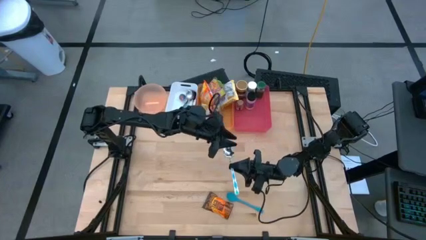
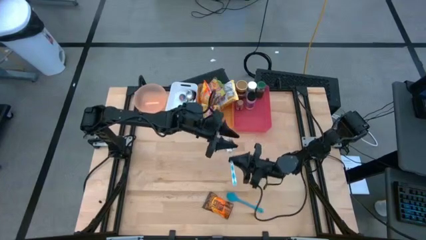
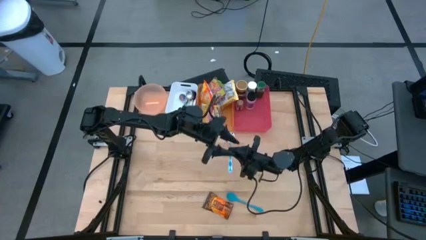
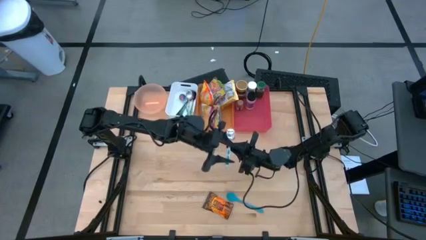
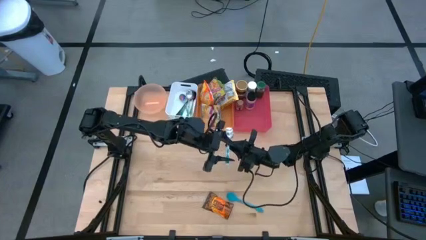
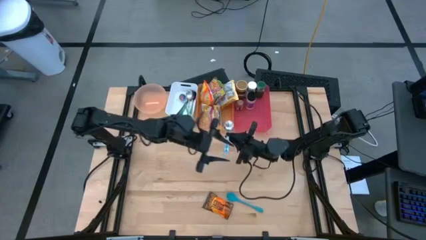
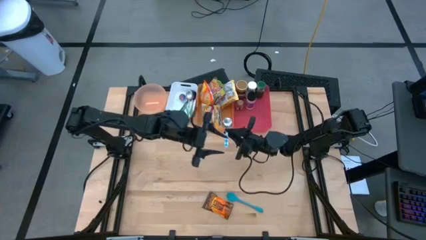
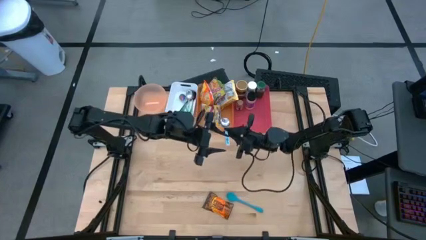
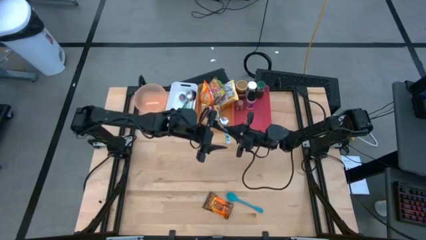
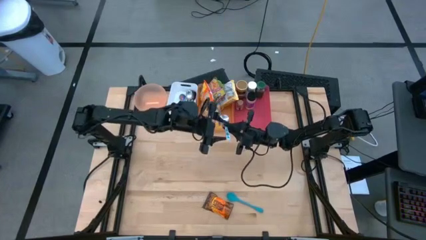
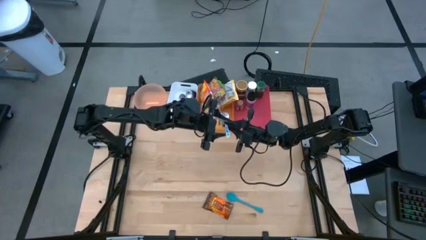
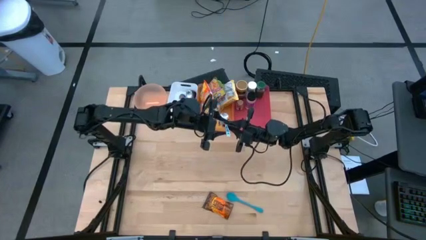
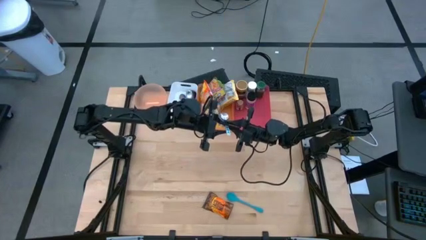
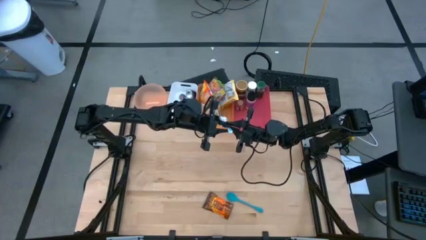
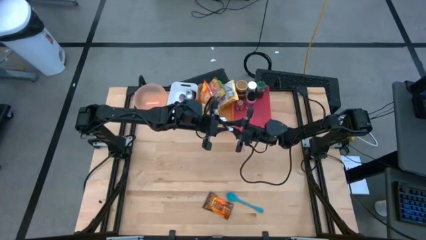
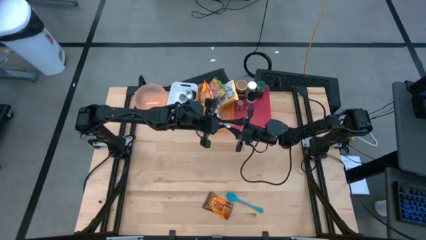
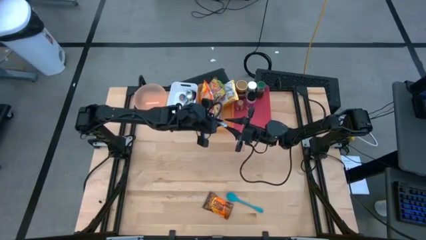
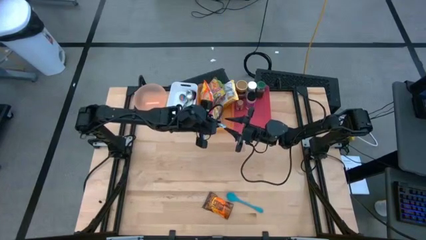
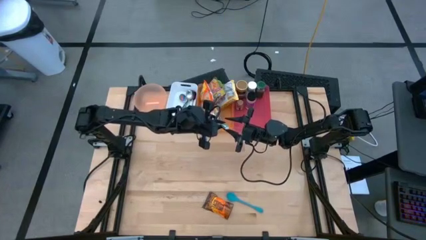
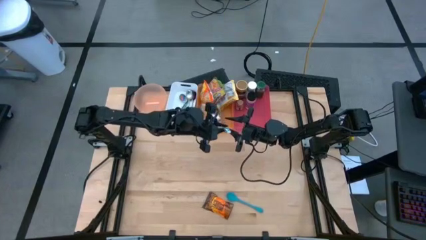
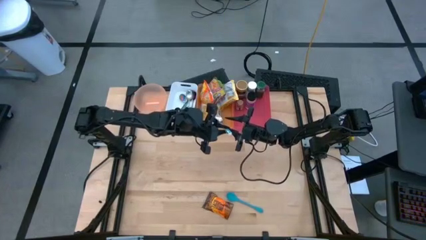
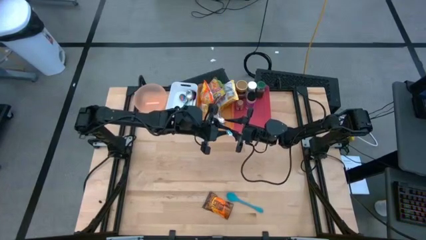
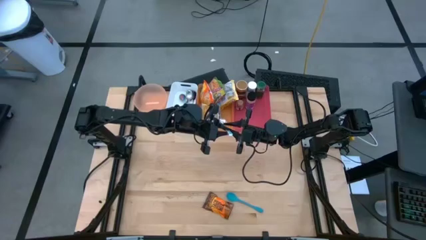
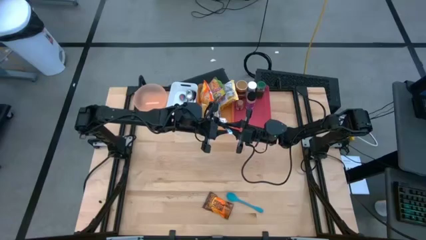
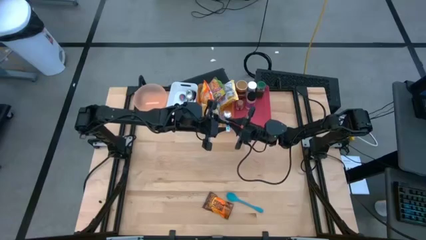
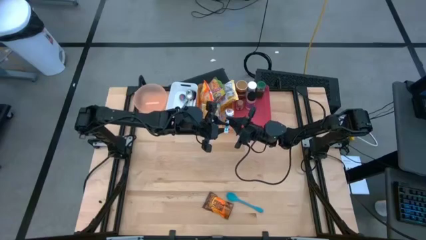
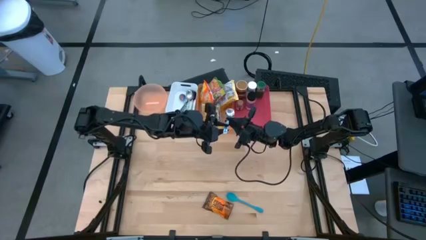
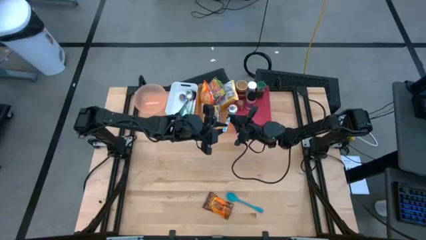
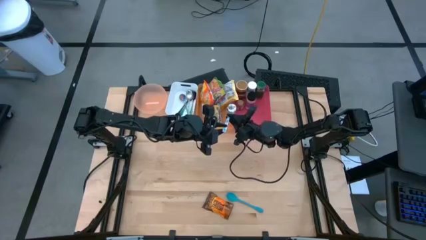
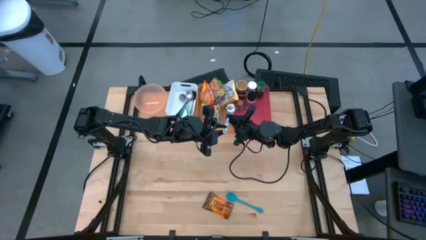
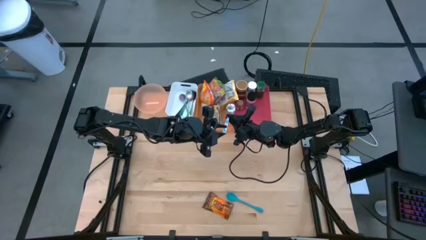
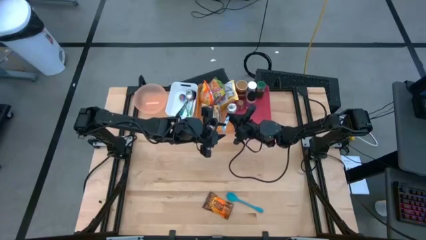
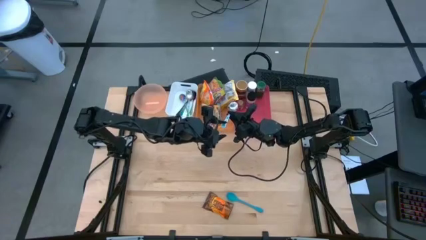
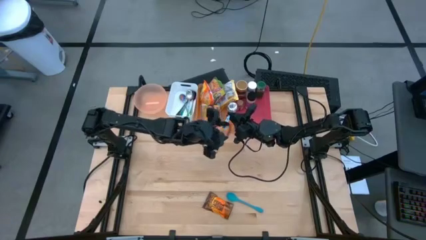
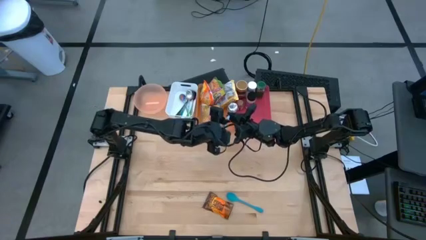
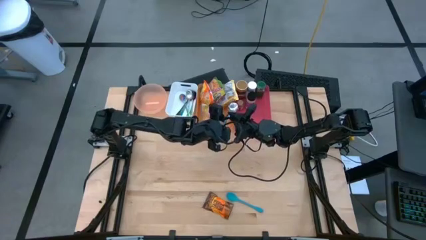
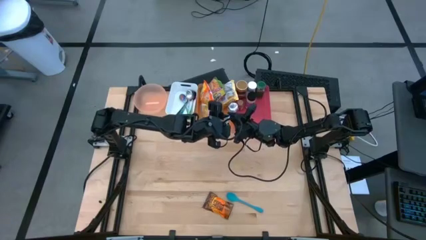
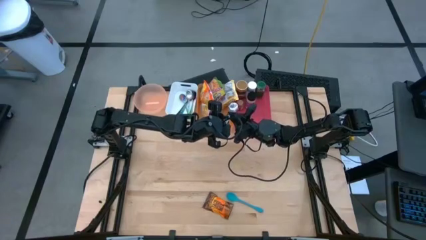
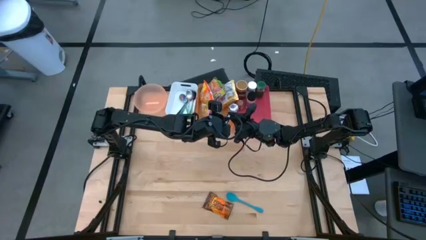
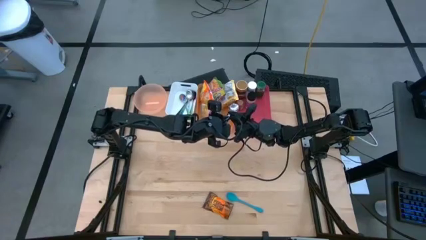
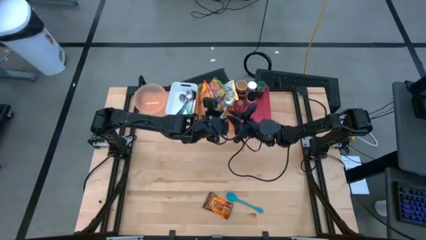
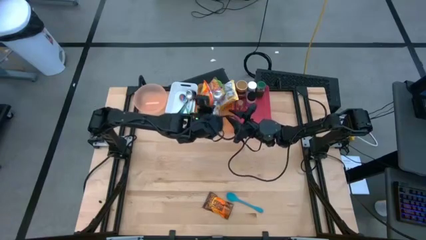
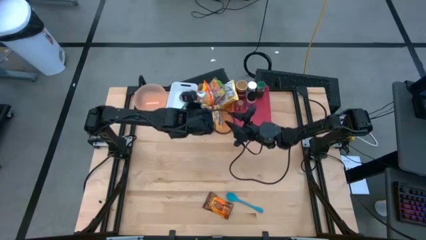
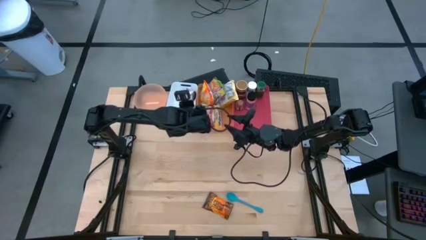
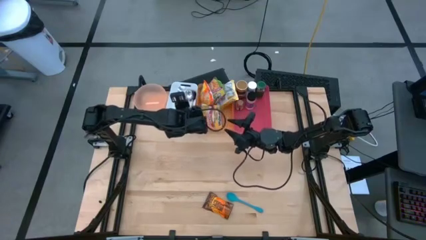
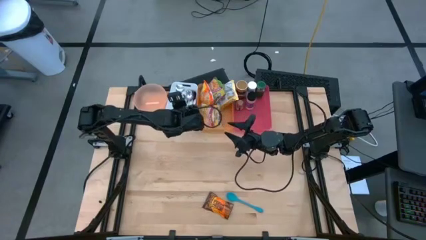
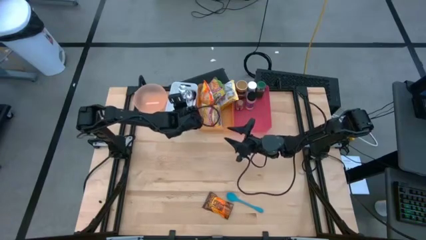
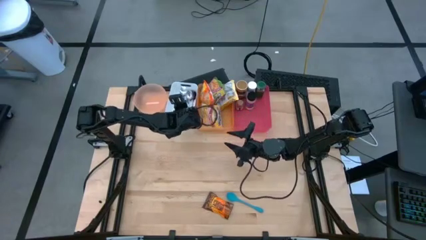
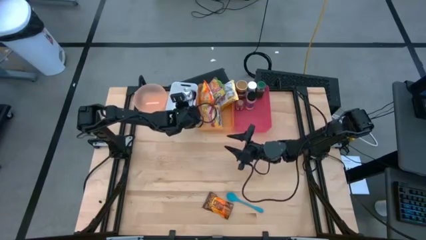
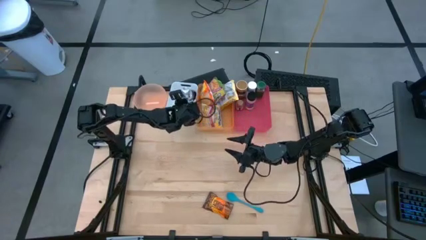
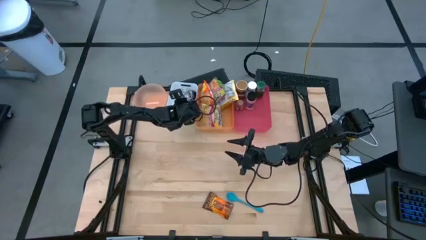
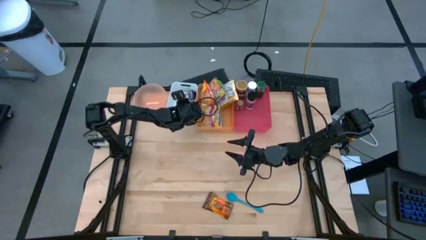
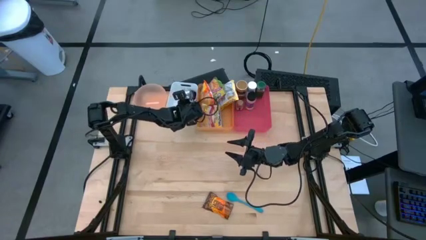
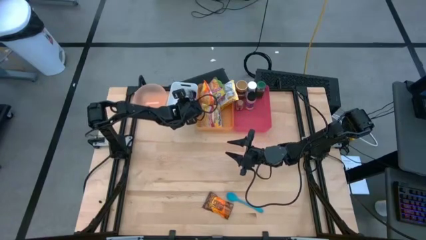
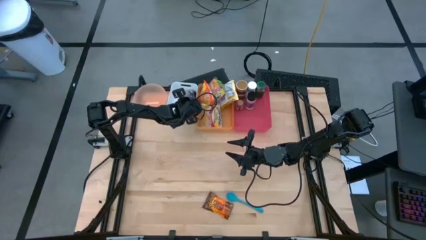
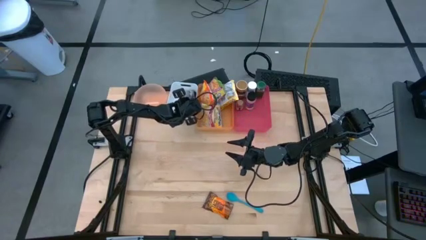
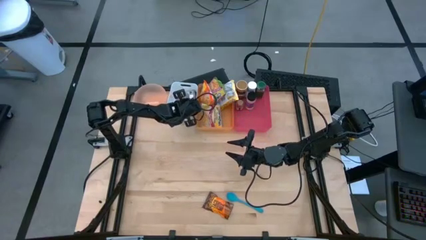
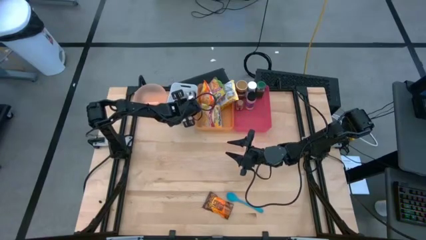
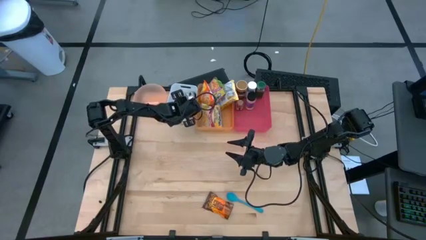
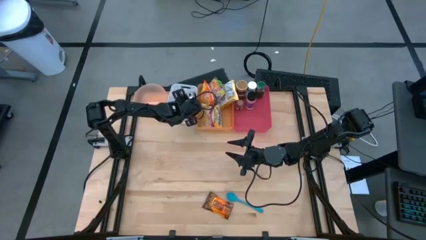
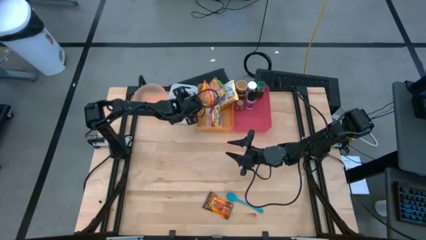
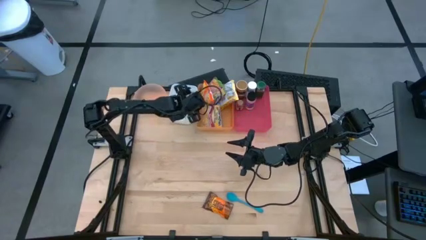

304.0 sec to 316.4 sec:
Task: Pick & Place Food Item
Put the blue patterned spoon into the white bin

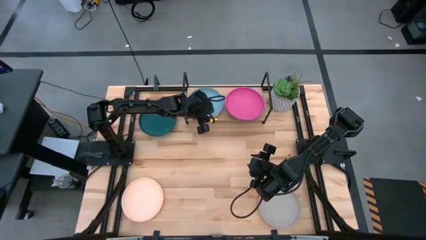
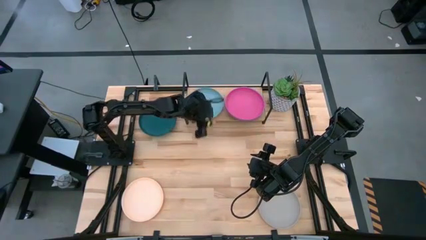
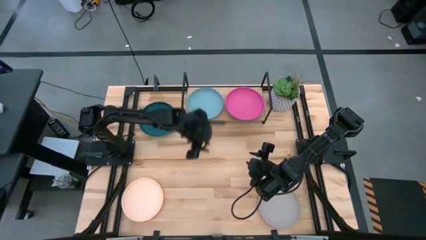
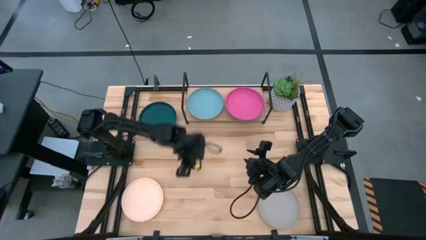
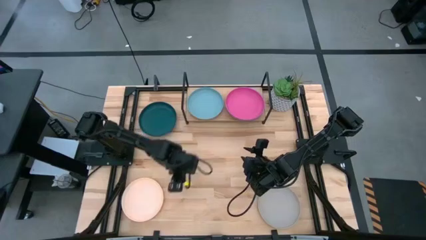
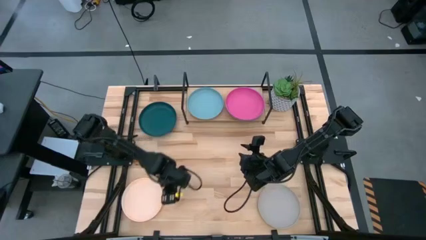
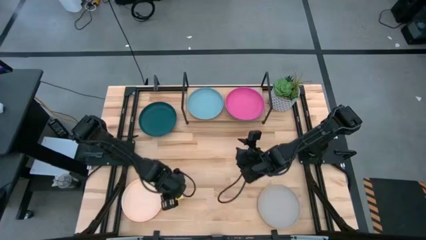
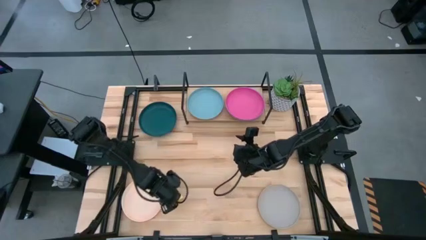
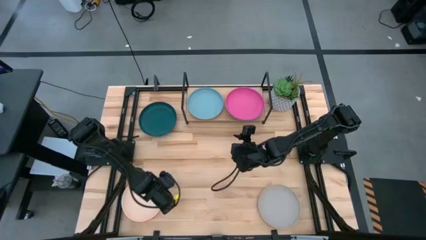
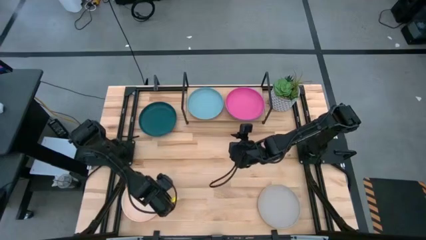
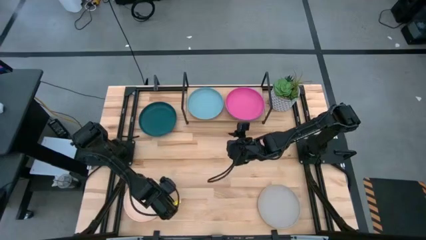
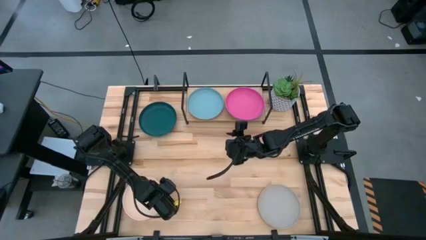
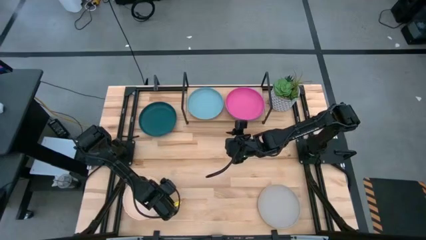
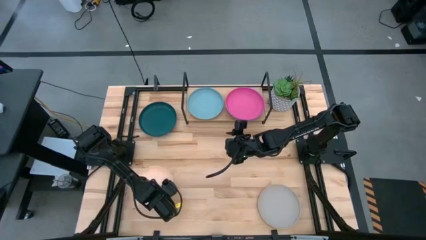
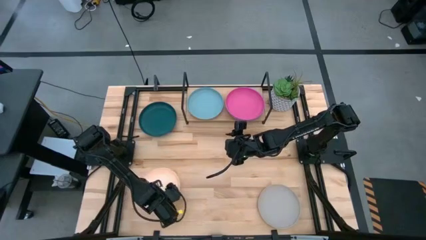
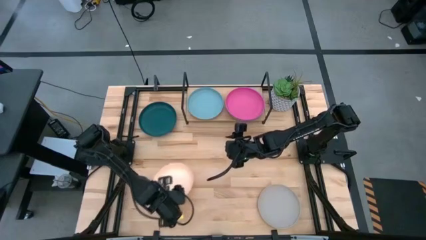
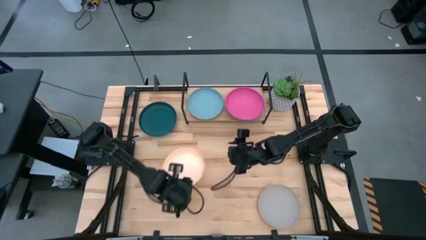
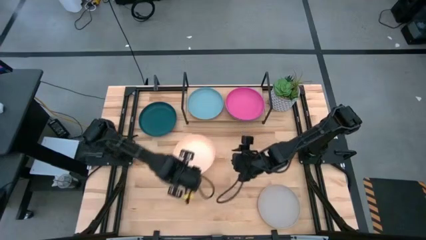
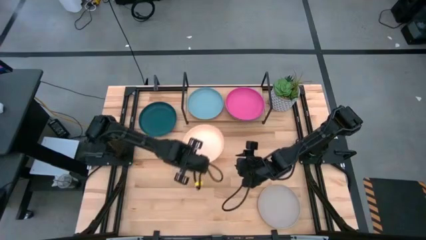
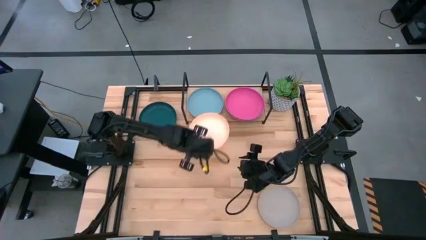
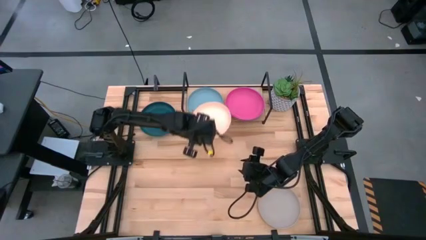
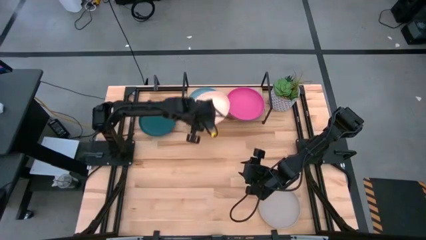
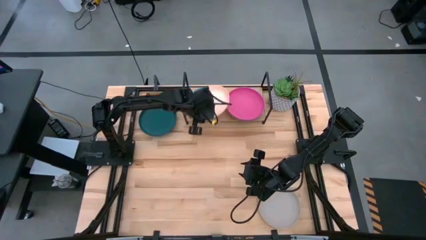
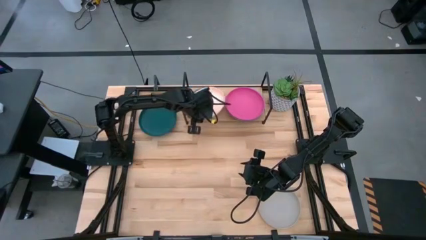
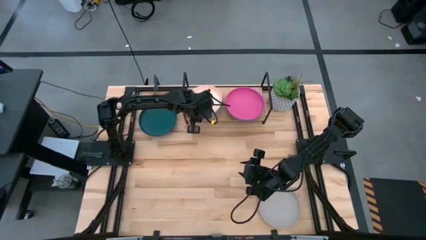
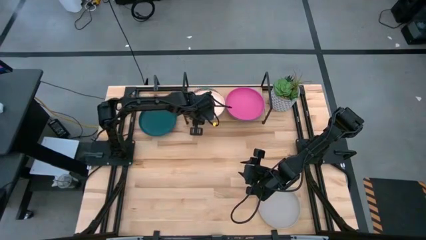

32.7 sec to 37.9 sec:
Task: Place and stack plates onto a shelf
Stack the white plate on top of the light blue plate on the shelf
